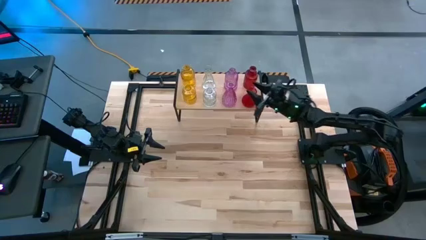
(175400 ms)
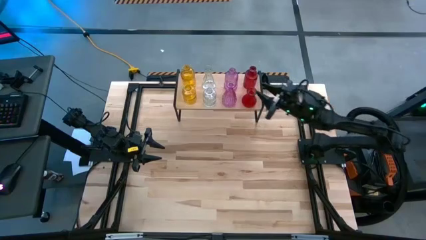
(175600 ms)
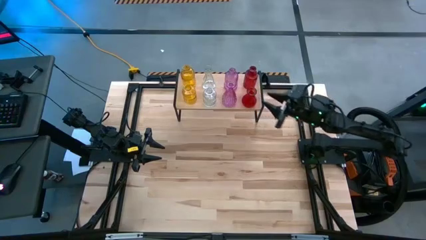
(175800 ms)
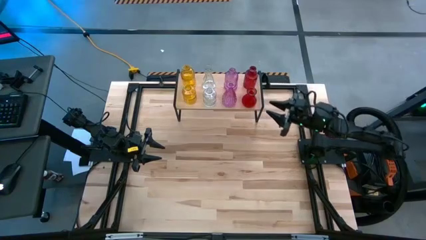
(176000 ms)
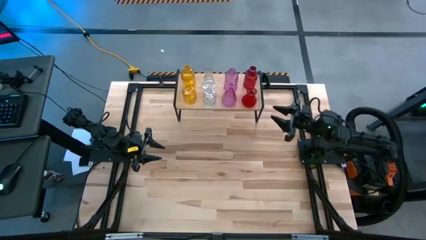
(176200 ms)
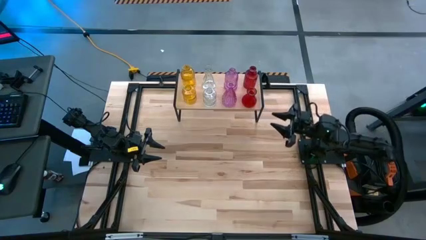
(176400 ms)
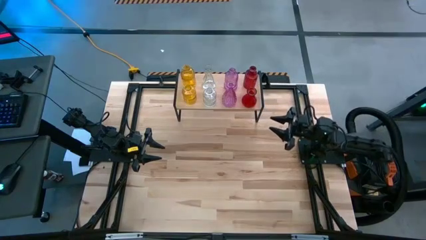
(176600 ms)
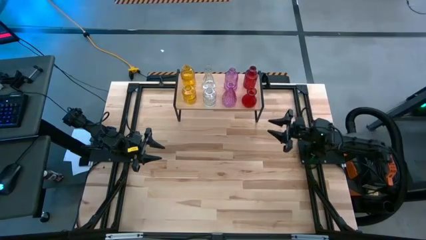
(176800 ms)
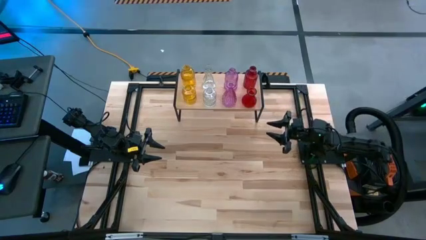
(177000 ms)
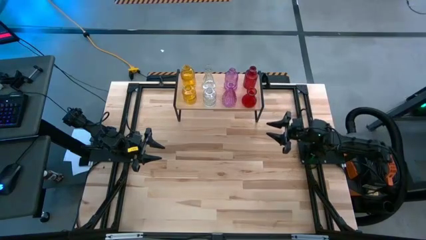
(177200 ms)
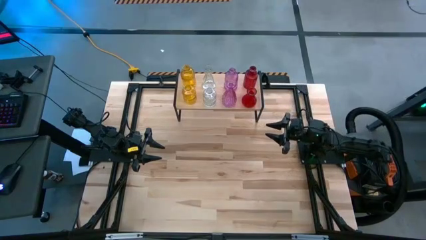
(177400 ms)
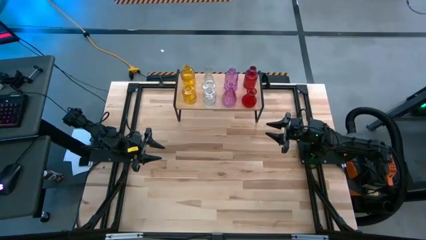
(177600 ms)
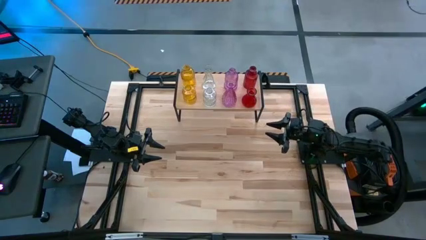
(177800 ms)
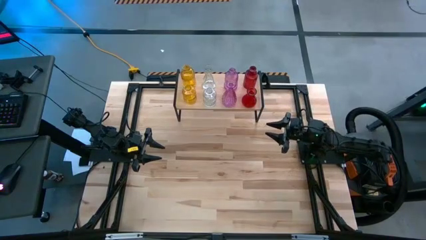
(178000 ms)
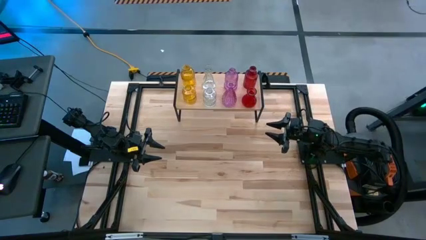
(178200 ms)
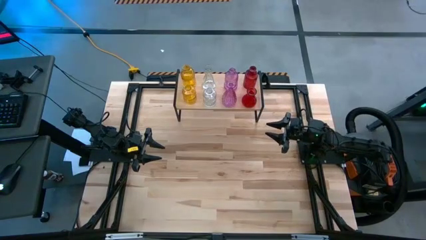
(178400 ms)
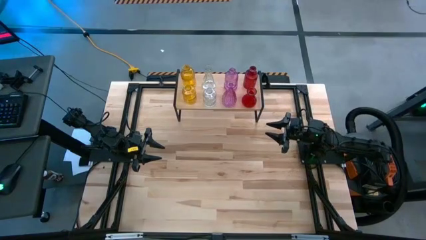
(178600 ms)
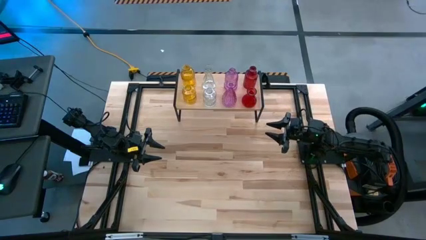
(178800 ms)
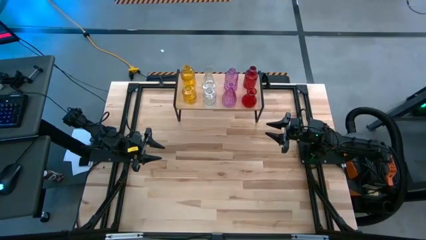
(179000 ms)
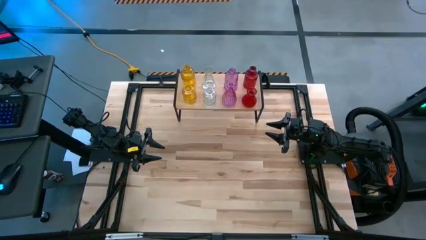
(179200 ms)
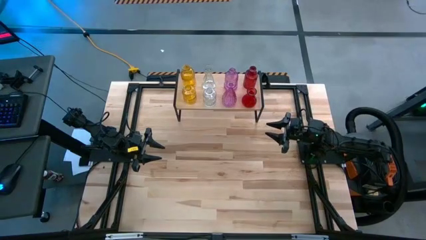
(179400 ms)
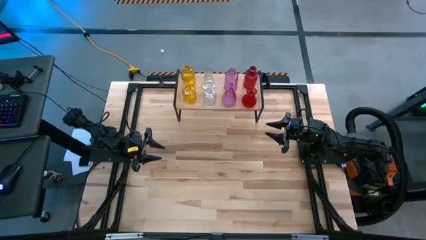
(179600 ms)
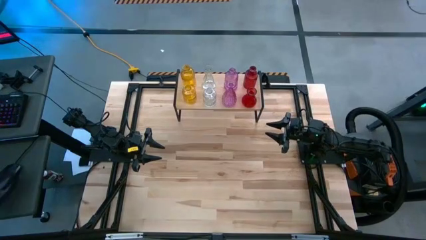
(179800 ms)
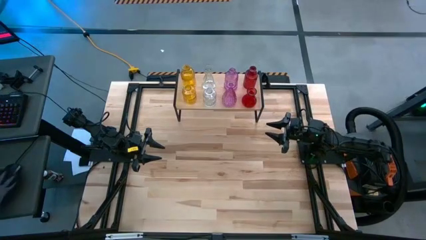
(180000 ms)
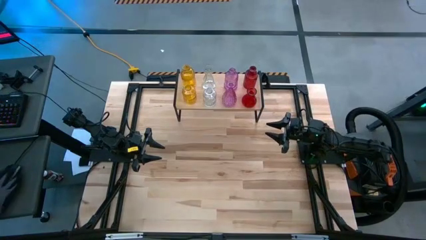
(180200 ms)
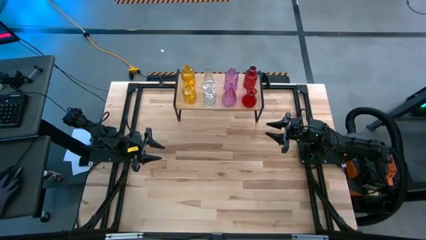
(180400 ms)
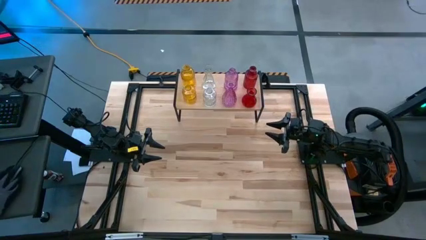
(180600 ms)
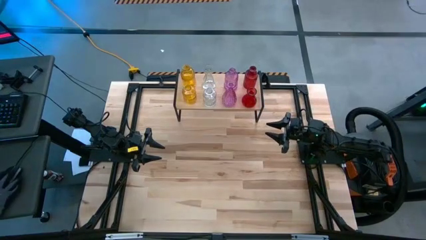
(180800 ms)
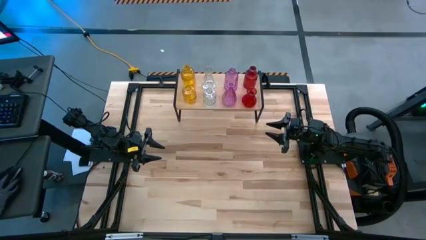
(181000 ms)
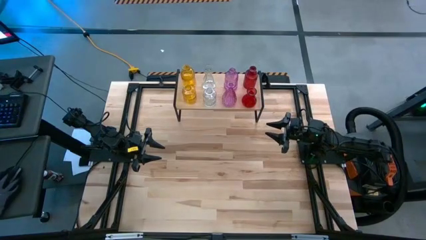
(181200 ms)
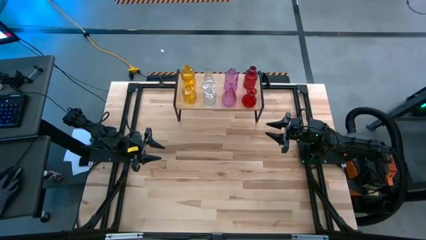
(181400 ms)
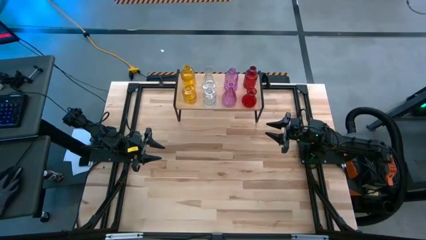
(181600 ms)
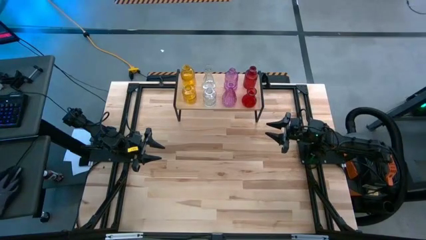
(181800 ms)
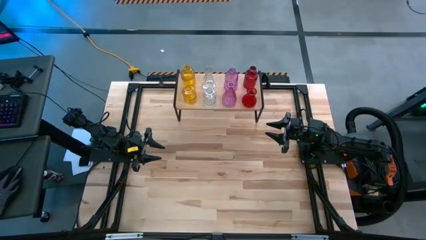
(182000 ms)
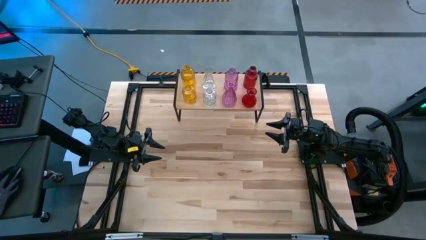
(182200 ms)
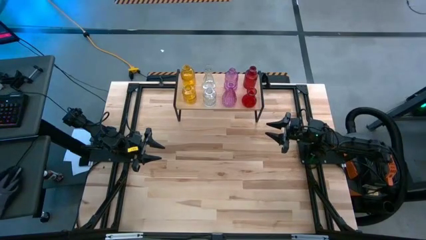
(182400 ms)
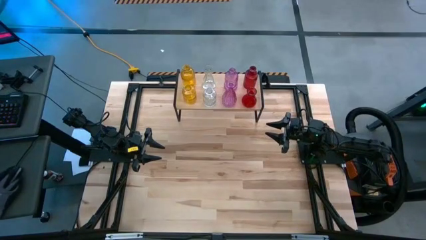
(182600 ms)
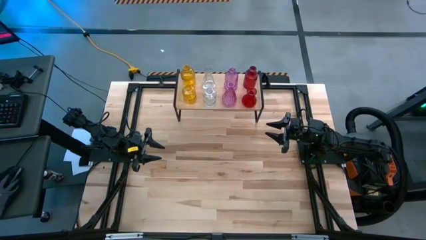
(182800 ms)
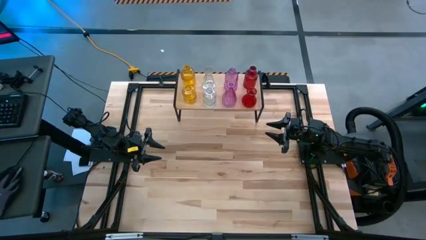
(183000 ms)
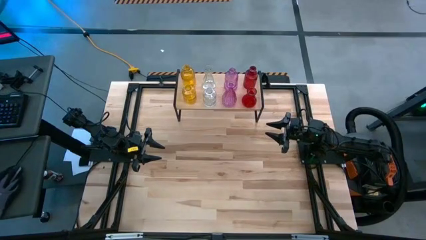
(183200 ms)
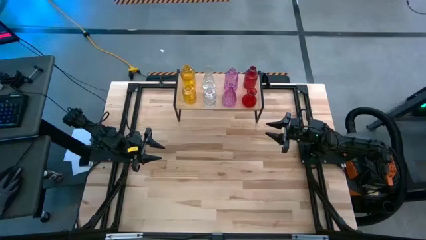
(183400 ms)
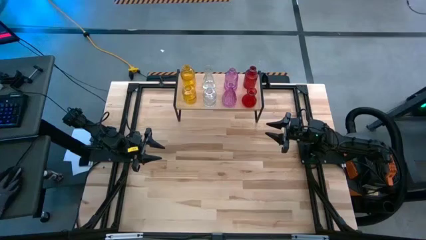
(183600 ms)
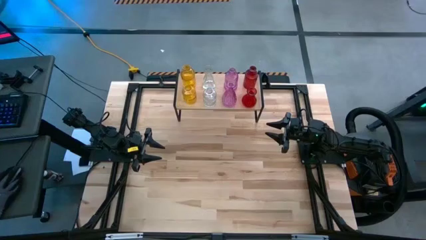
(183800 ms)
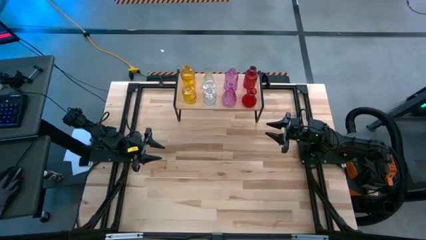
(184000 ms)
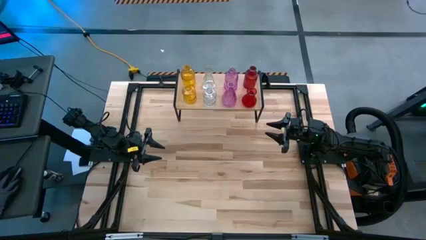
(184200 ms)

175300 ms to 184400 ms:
Task: sort vases onto shelf
Return to Home Position

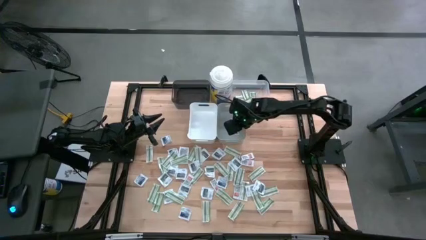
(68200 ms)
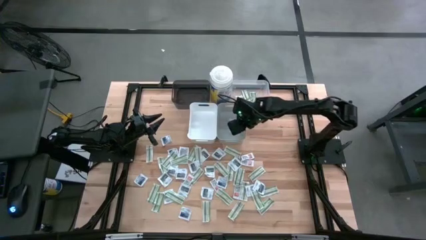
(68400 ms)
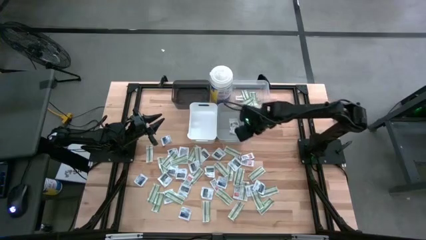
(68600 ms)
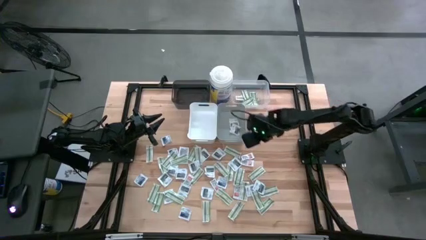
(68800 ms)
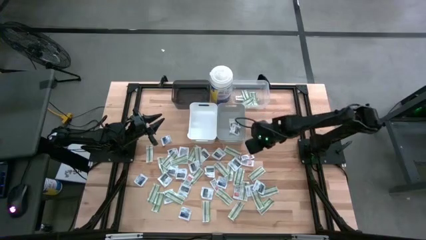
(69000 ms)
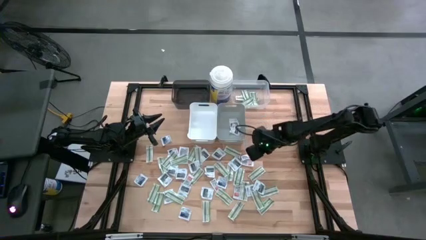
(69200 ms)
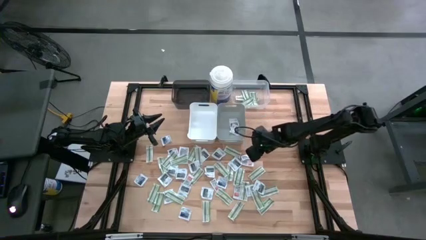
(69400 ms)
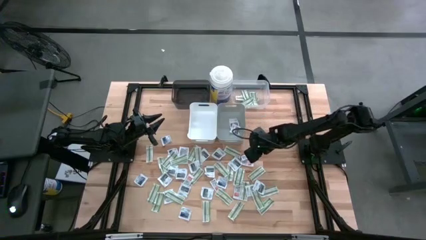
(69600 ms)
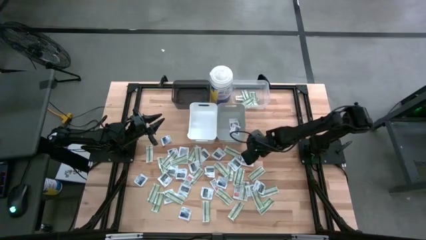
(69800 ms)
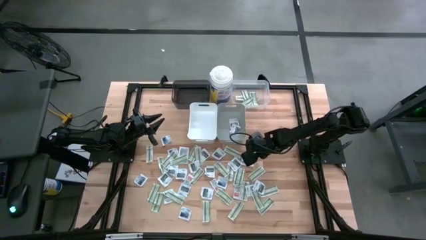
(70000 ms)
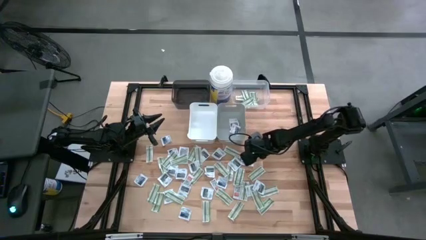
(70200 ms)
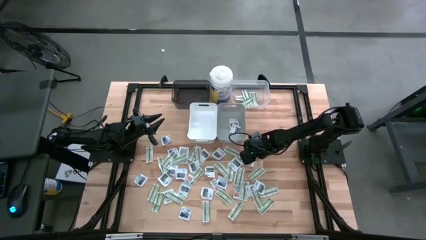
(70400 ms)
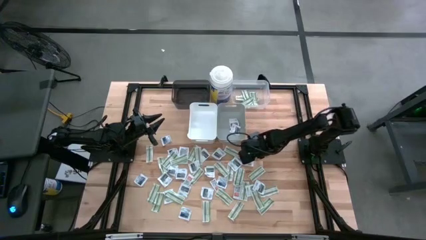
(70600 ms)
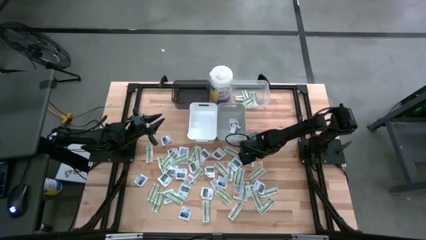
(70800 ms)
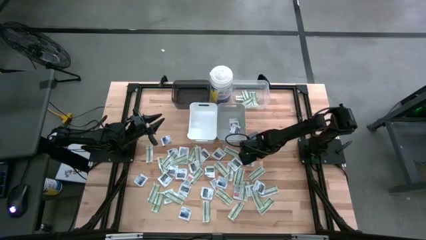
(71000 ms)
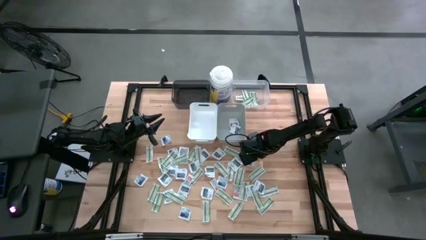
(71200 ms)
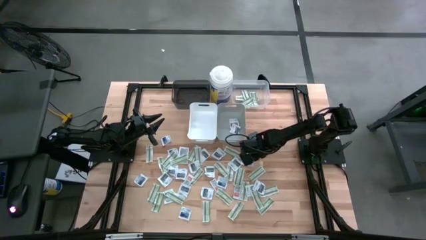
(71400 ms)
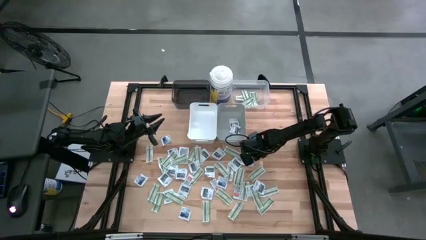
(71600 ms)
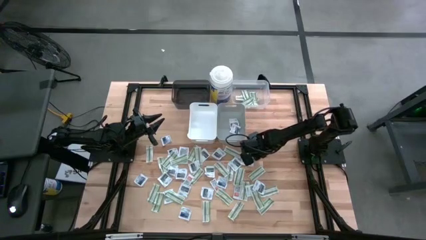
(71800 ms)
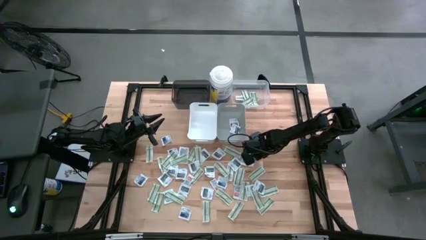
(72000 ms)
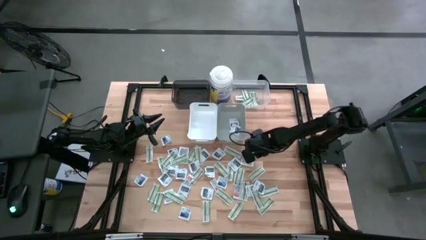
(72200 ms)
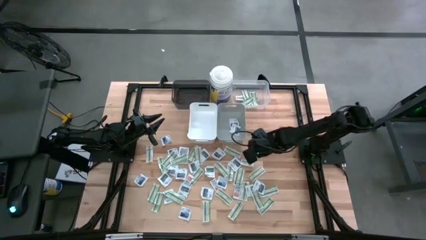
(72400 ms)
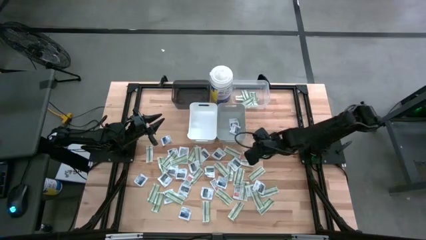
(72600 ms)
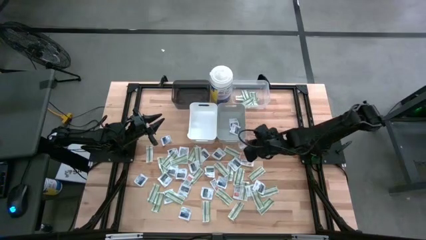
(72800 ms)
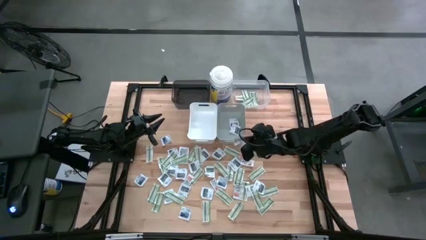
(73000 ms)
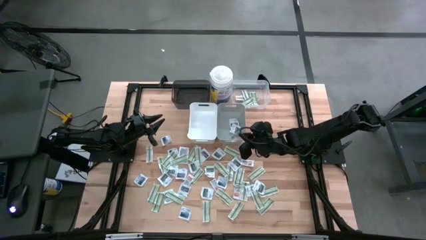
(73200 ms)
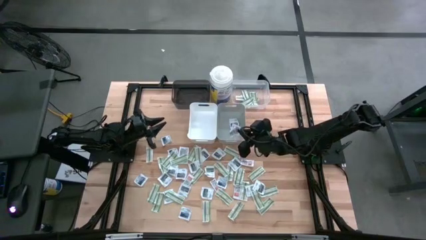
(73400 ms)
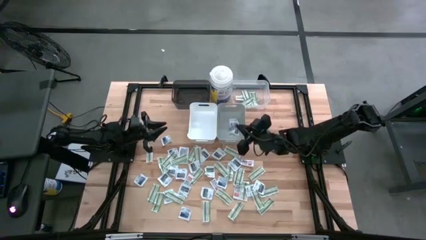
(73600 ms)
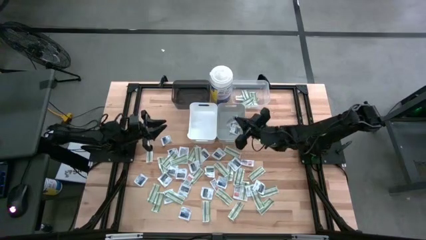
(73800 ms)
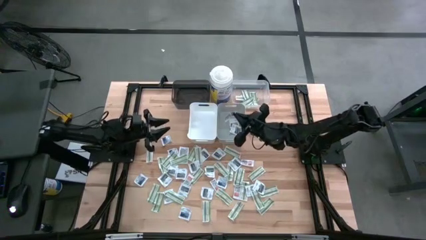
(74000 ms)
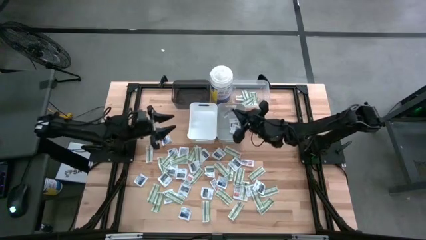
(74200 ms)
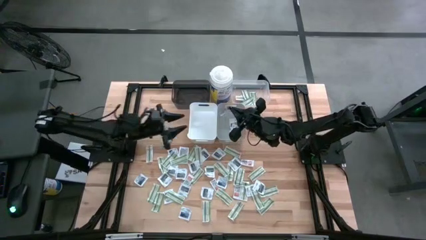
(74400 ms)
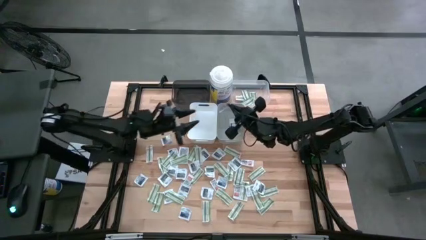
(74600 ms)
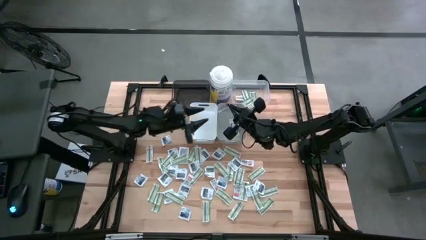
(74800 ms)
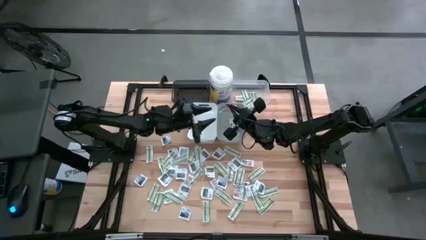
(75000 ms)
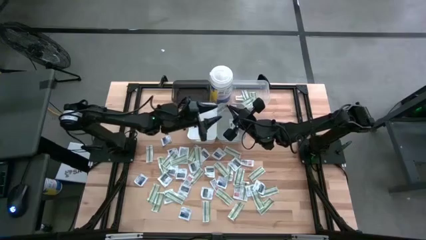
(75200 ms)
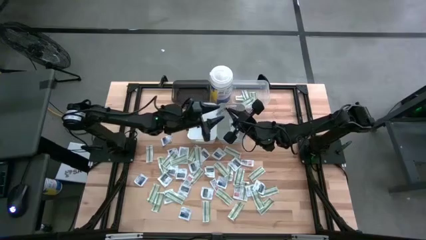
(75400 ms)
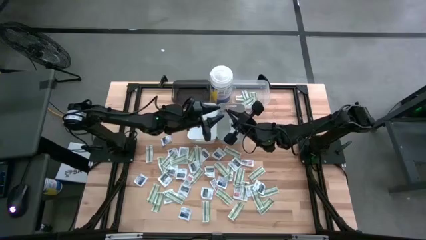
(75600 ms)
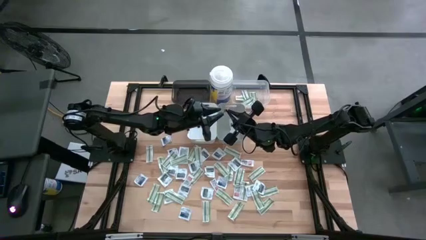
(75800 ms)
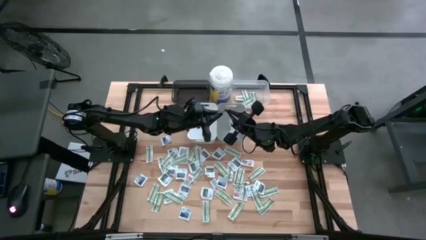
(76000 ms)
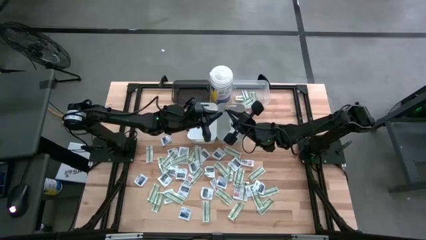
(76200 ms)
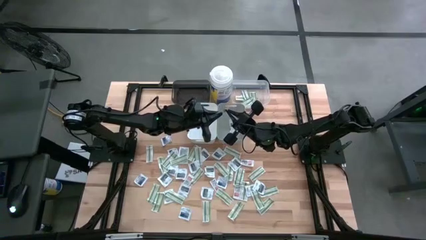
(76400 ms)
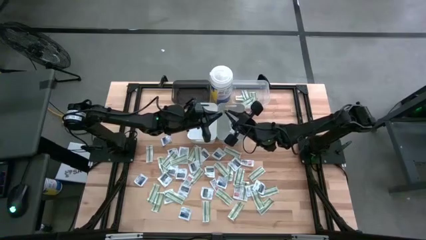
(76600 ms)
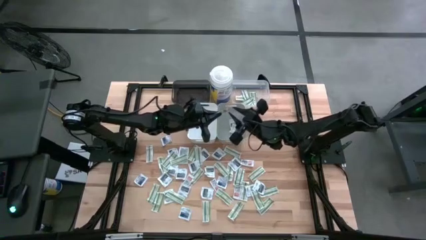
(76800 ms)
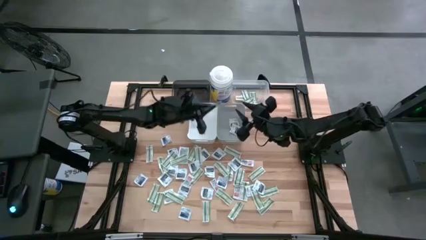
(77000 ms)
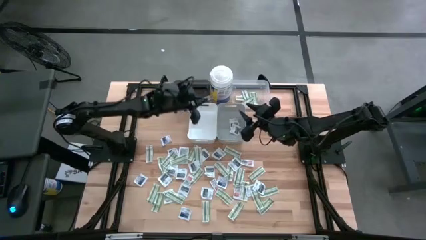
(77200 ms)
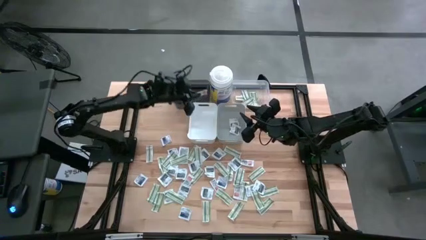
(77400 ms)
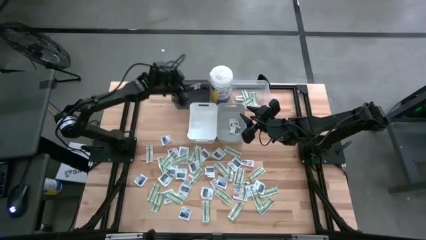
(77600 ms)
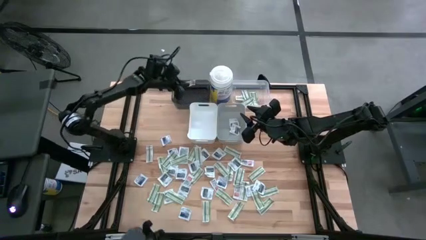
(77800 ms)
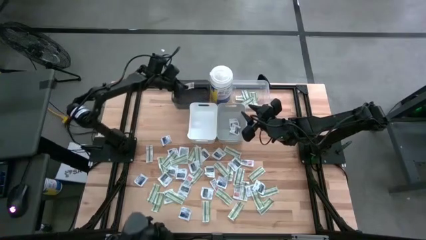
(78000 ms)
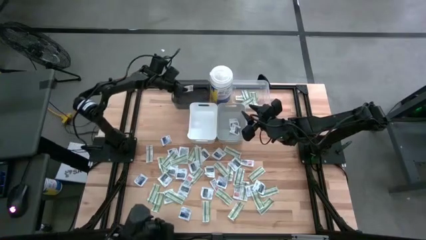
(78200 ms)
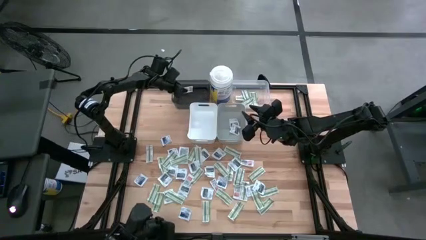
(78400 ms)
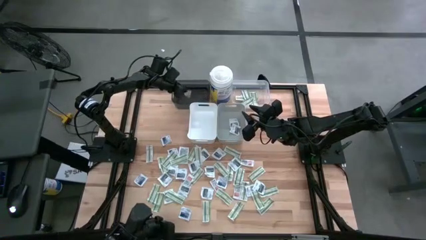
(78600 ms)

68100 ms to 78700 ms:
Task: Pick & Place First Aid Supplies
Put the ointment into the black transparent bin
